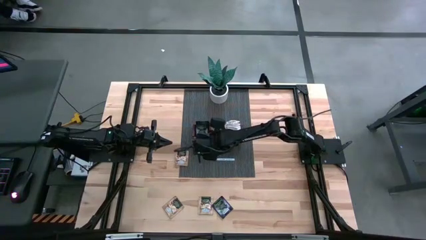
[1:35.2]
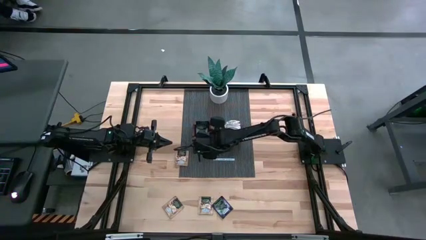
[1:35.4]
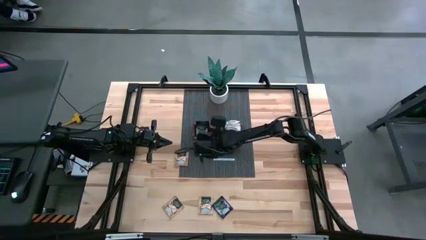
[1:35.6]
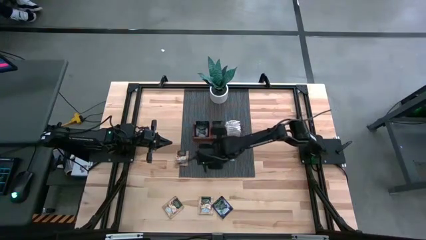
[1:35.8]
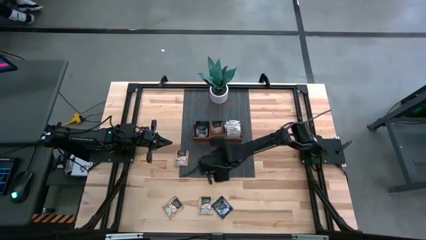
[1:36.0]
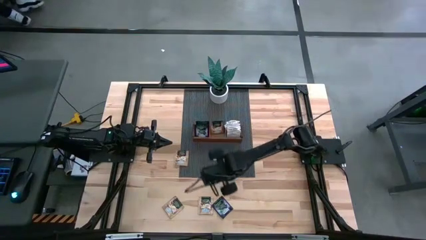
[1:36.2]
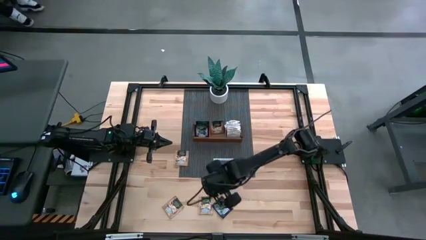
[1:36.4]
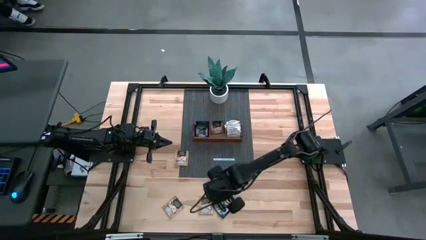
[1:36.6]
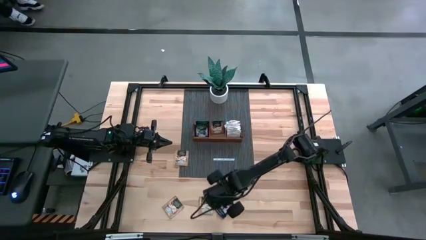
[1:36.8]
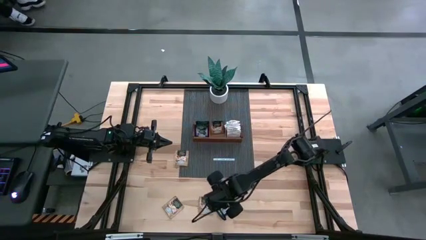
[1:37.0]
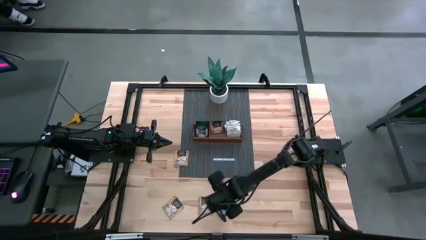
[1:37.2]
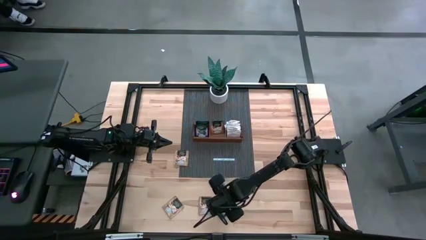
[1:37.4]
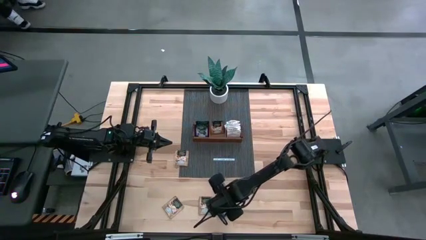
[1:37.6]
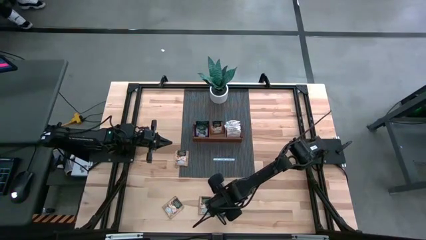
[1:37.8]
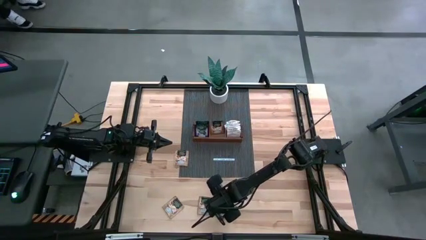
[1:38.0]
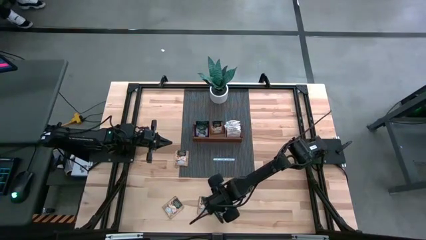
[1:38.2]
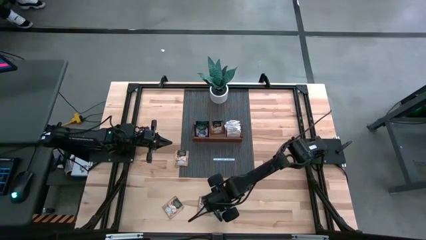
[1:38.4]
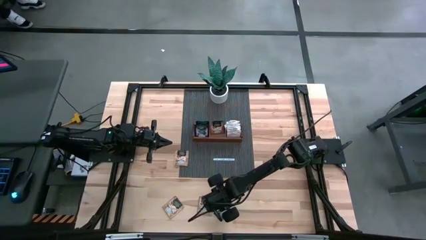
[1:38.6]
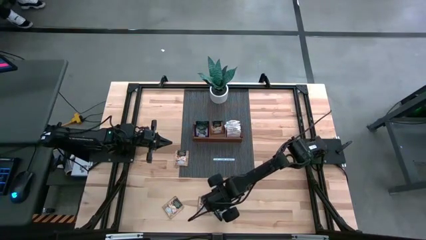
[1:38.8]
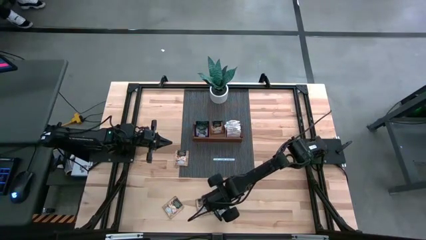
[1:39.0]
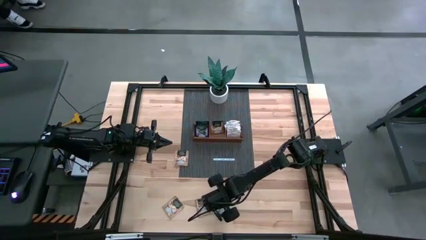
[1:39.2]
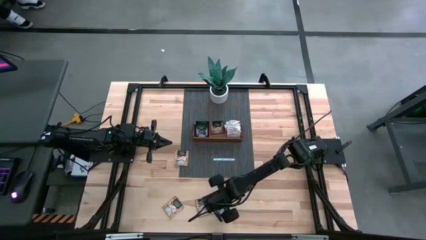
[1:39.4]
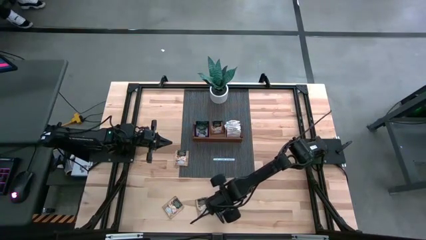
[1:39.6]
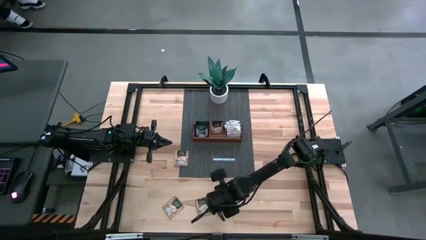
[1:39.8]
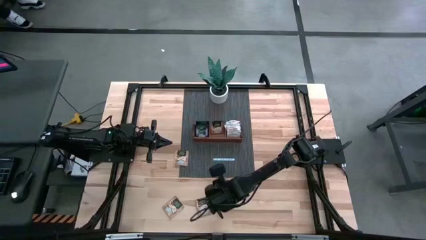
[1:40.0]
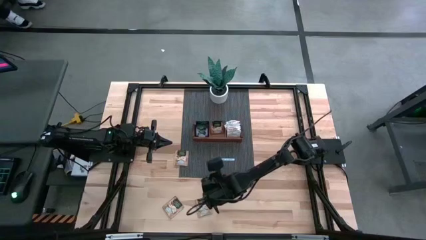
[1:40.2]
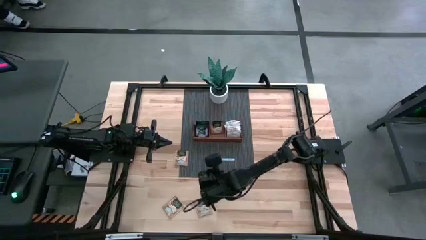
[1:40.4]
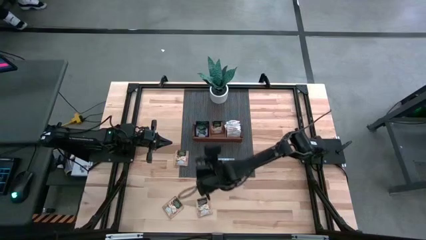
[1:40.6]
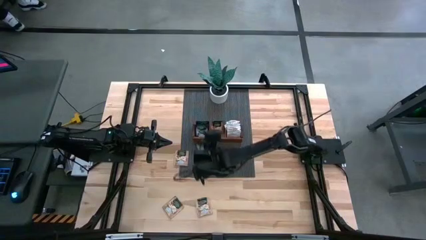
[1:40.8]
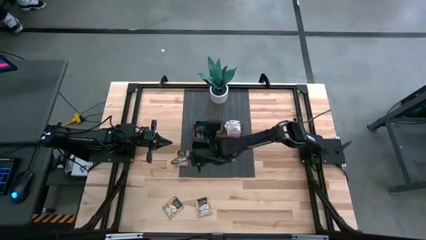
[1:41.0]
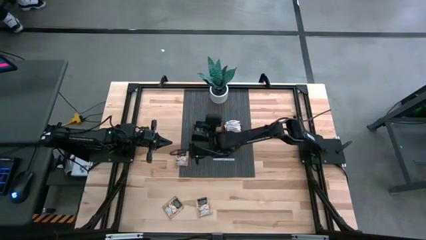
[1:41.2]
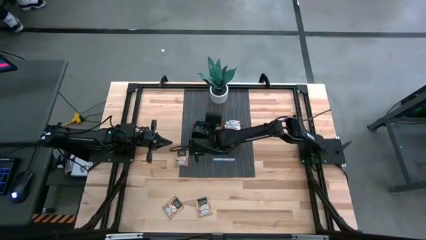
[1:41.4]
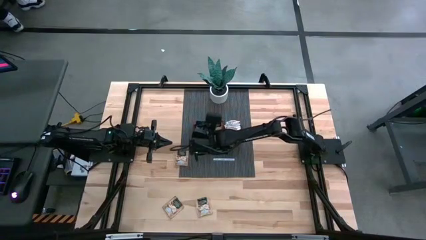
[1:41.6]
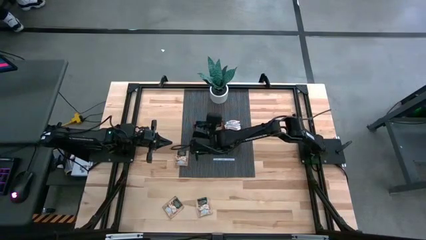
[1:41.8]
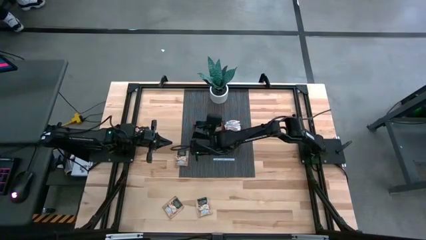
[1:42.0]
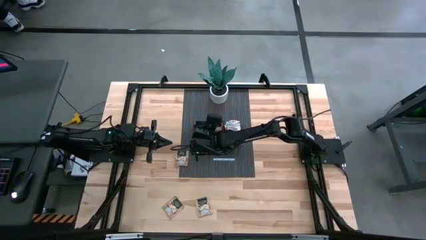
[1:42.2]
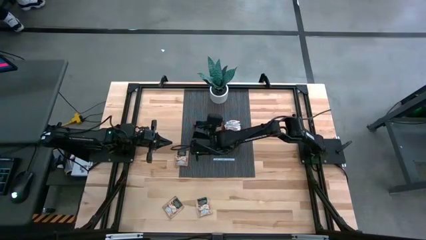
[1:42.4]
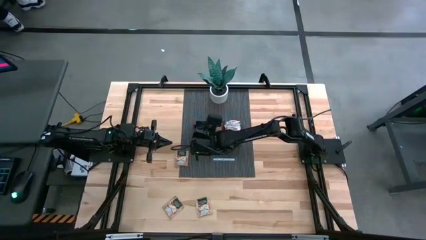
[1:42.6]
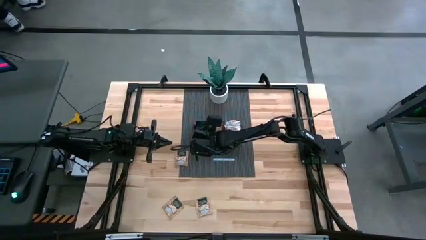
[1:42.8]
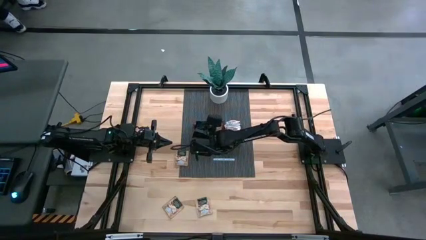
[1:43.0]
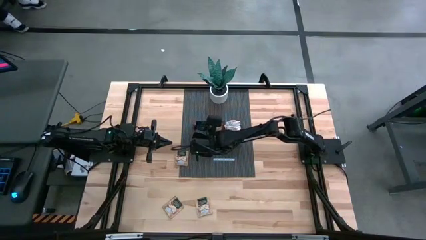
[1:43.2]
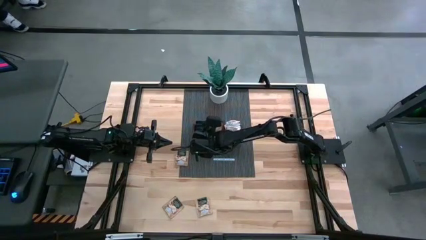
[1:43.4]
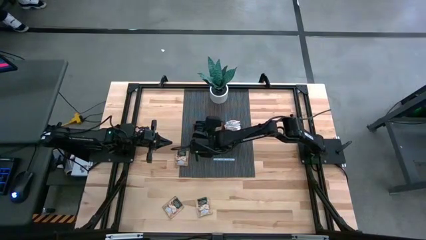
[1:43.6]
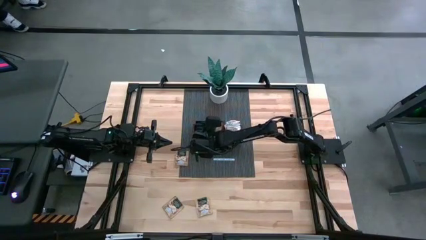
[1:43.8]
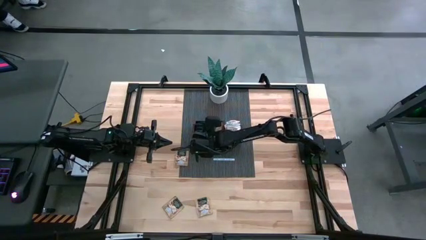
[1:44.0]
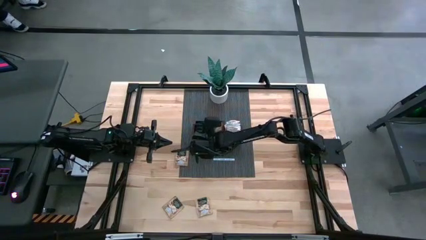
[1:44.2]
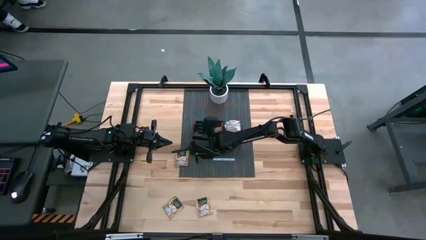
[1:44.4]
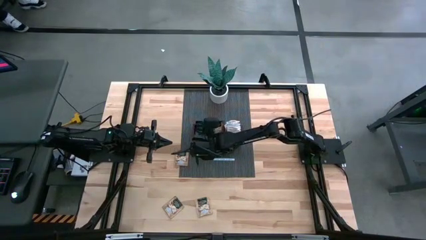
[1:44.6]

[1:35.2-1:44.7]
Task: Pick & Place Tea
Put the violet tea bag into the left section of the wooden organizer

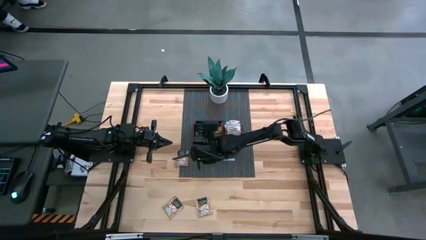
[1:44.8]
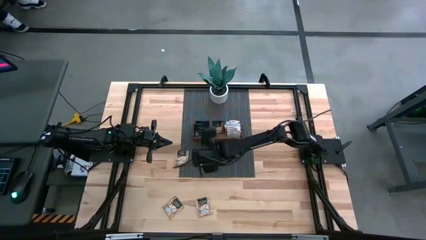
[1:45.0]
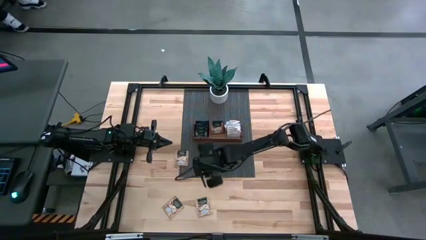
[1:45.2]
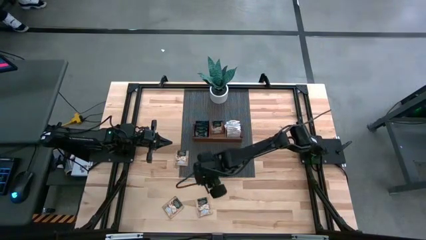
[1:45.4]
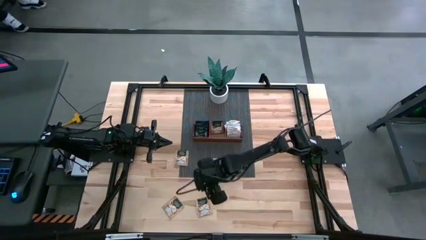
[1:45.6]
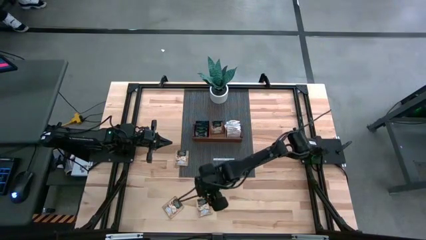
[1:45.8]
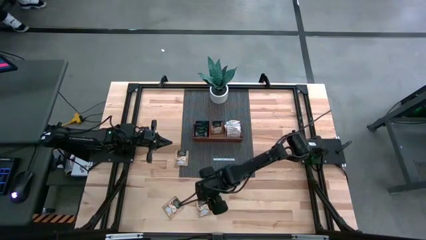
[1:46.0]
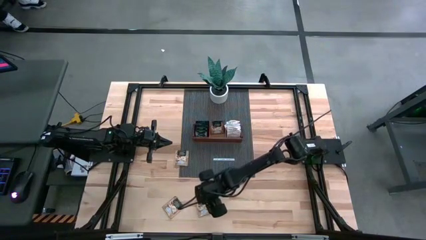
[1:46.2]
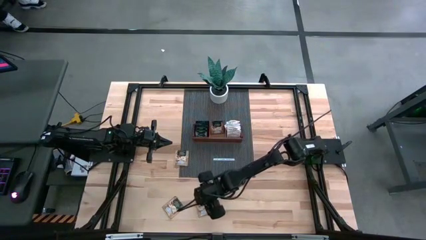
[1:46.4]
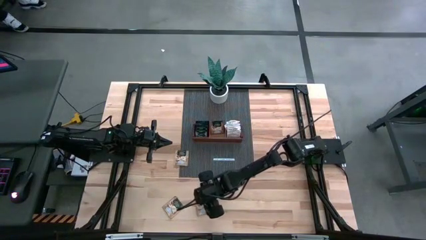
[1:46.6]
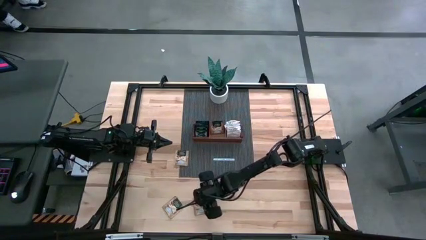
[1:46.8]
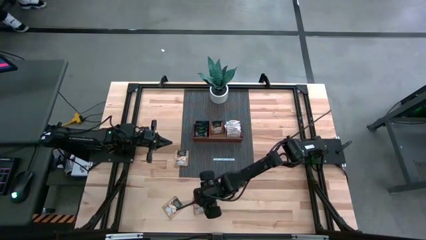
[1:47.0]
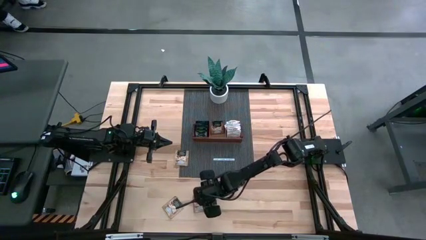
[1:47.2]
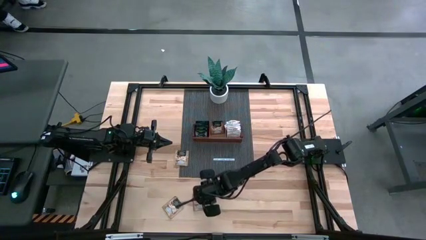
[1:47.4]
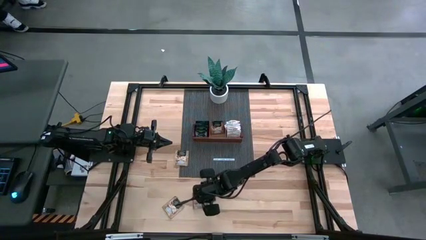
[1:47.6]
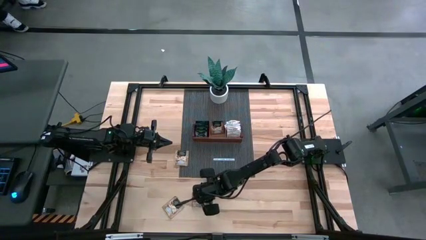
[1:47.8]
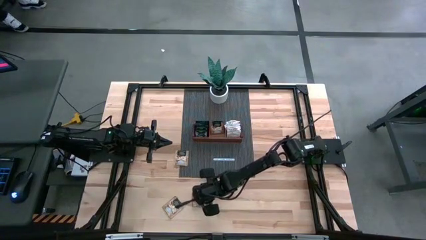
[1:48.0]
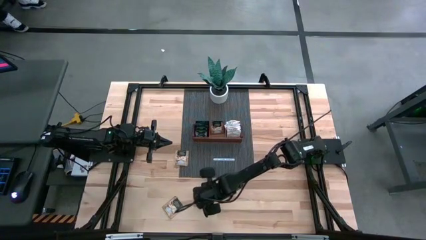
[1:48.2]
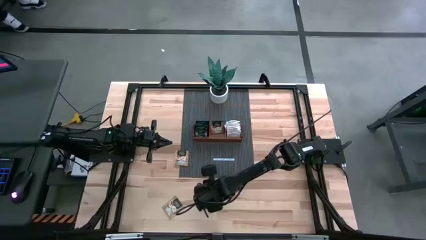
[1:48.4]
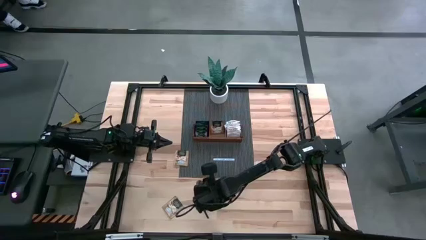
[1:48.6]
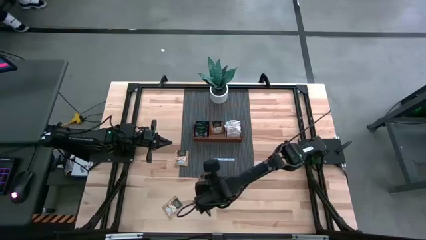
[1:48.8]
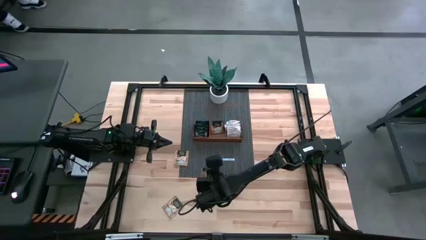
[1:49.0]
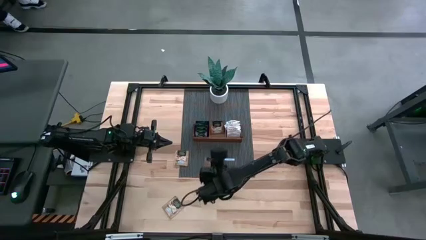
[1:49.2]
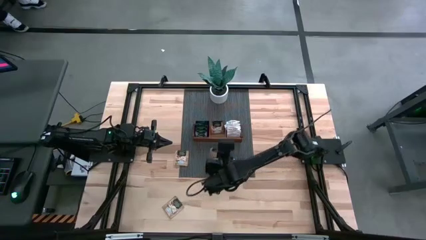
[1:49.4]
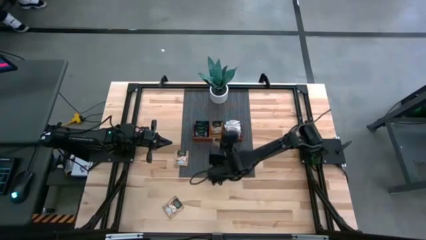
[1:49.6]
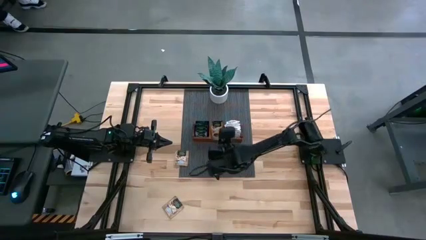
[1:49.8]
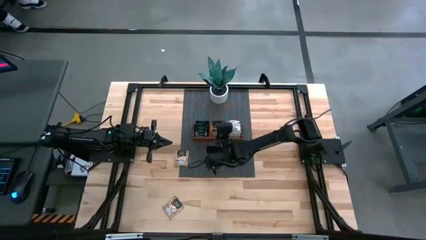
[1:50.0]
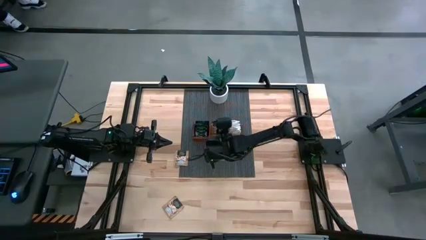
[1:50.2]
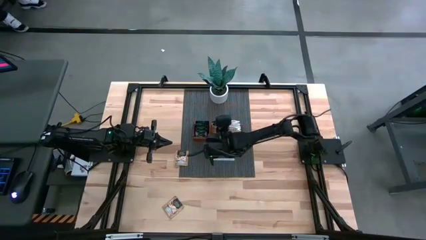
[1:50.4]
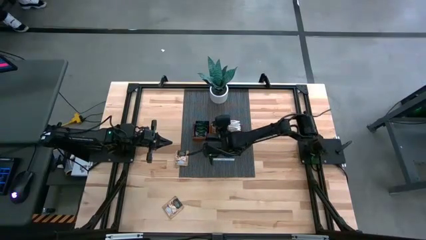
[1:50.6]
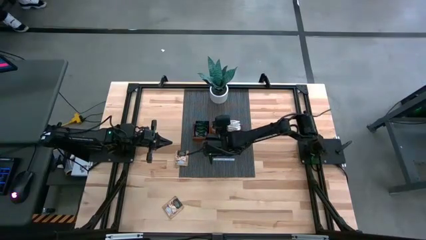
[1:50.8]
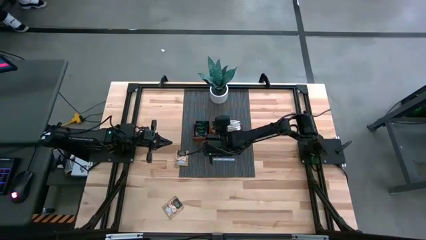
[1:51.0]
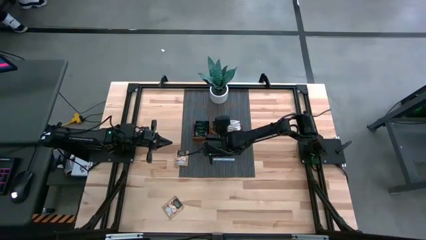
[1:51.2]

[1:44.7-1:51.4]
Put the brown tea bag into the middle section of the wooden organizer
